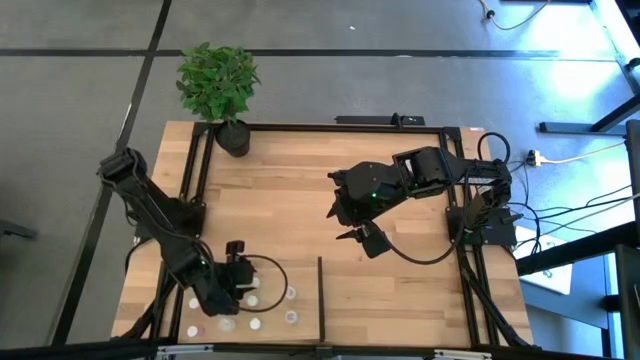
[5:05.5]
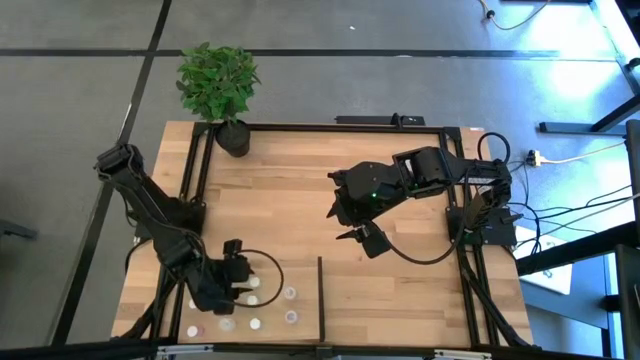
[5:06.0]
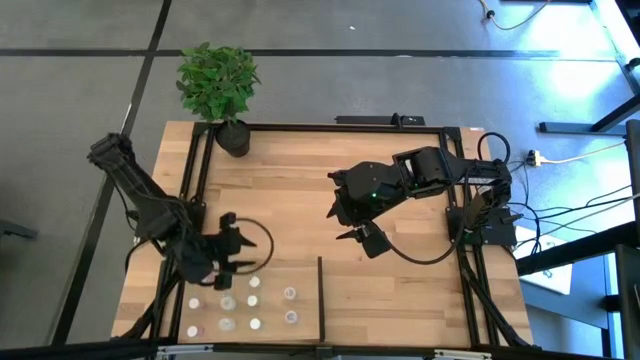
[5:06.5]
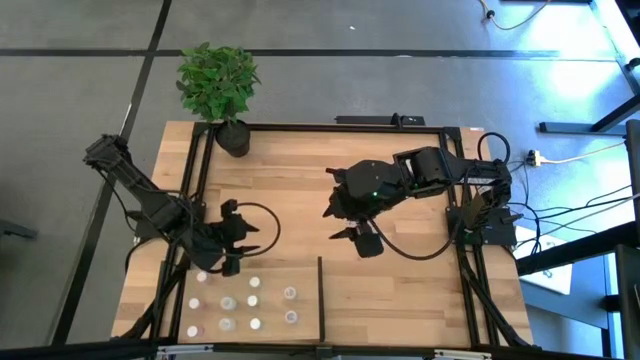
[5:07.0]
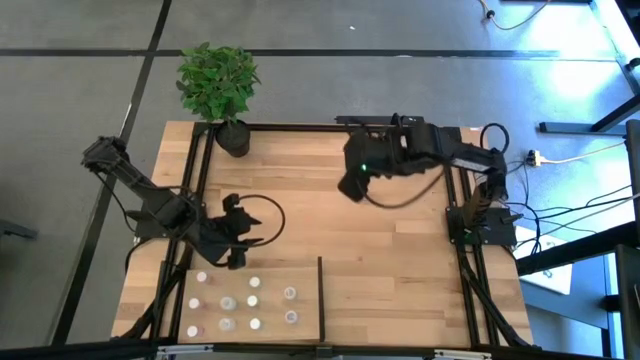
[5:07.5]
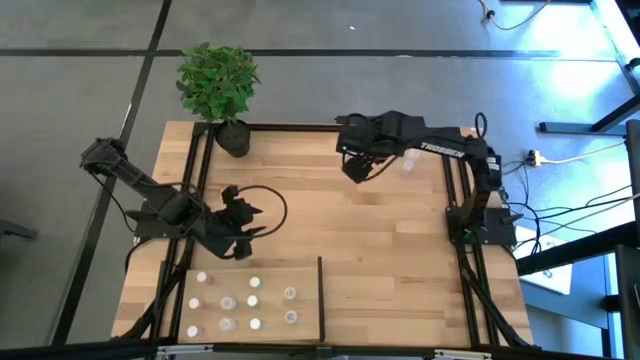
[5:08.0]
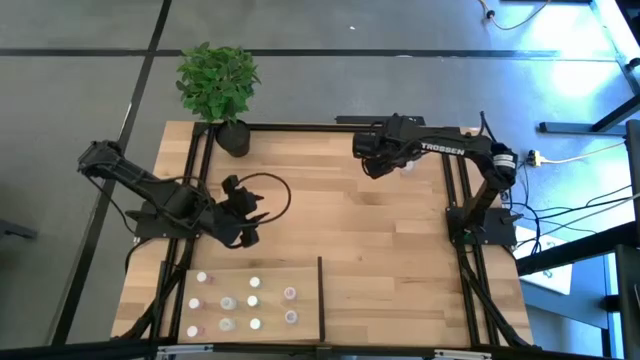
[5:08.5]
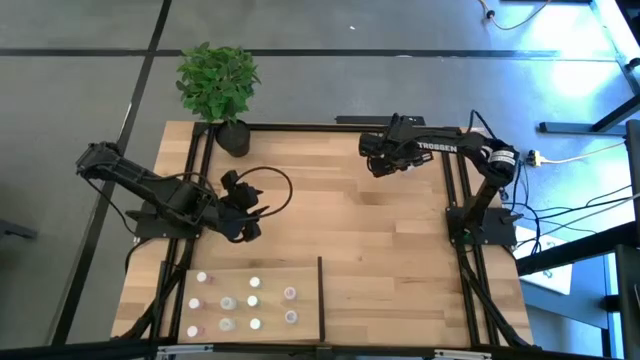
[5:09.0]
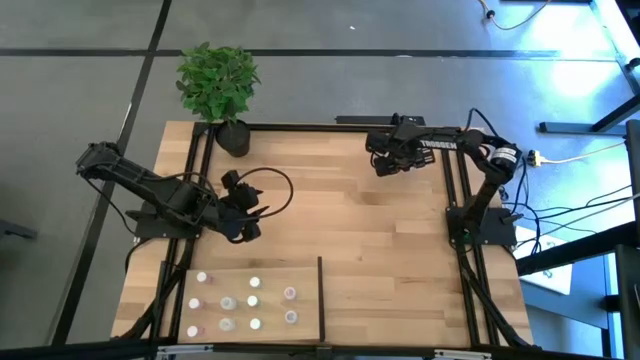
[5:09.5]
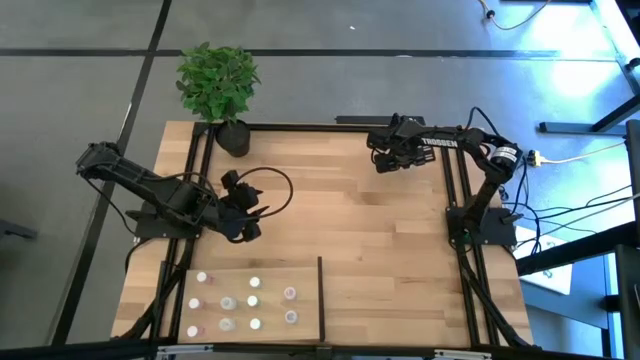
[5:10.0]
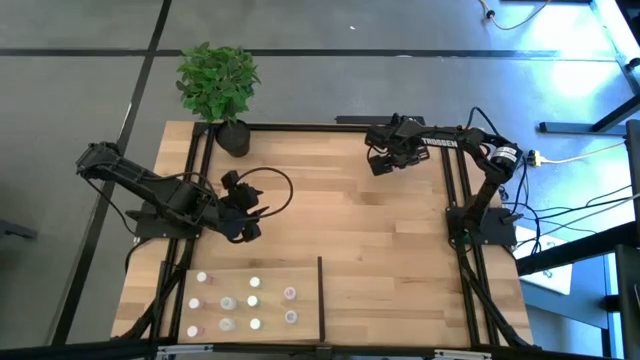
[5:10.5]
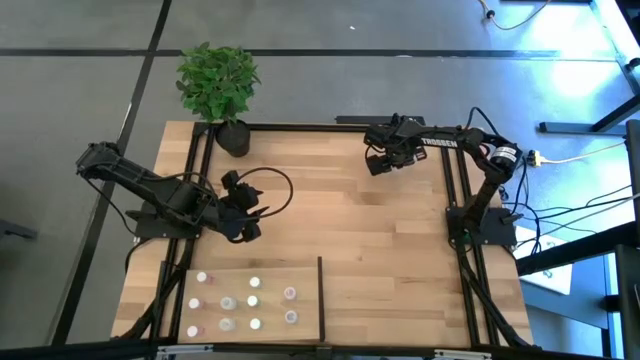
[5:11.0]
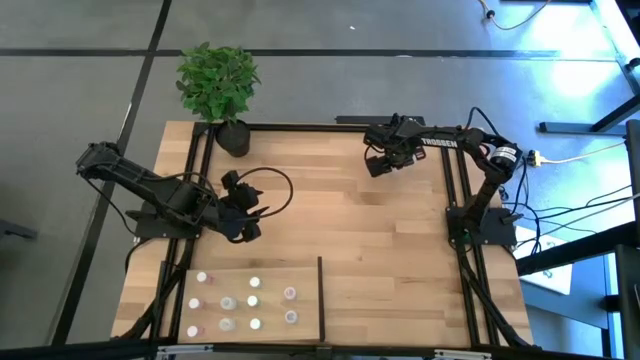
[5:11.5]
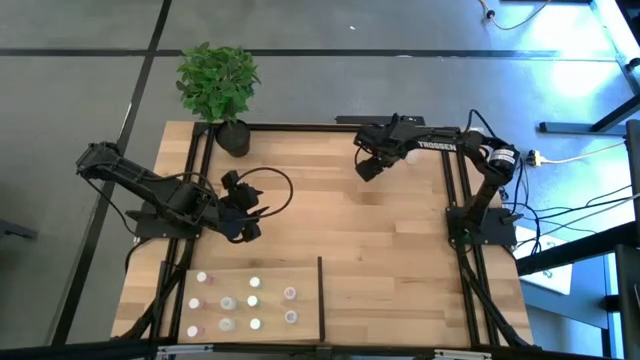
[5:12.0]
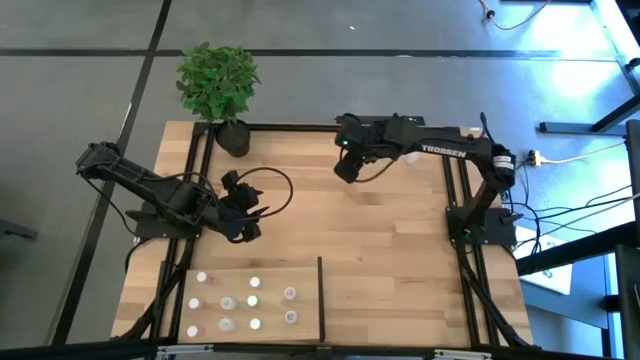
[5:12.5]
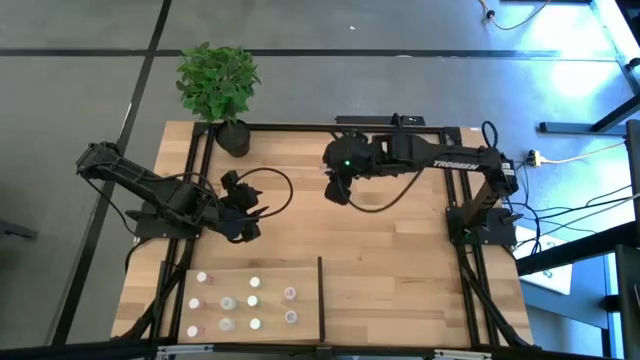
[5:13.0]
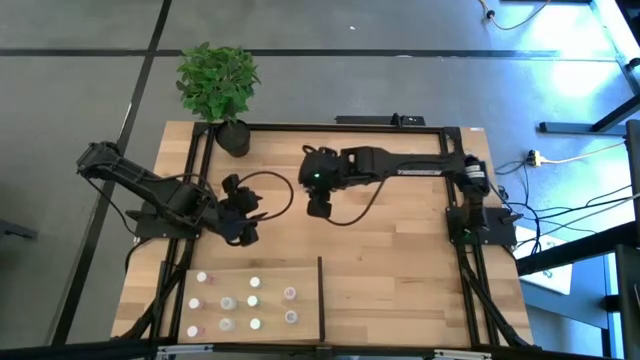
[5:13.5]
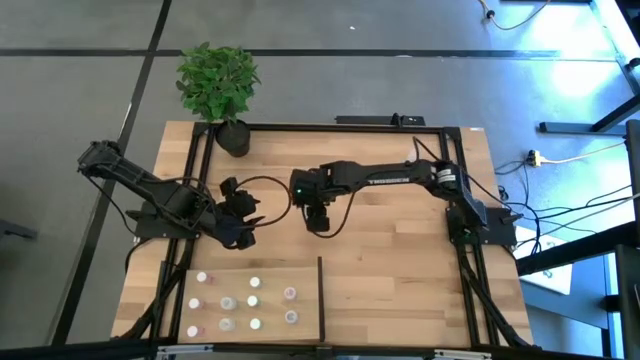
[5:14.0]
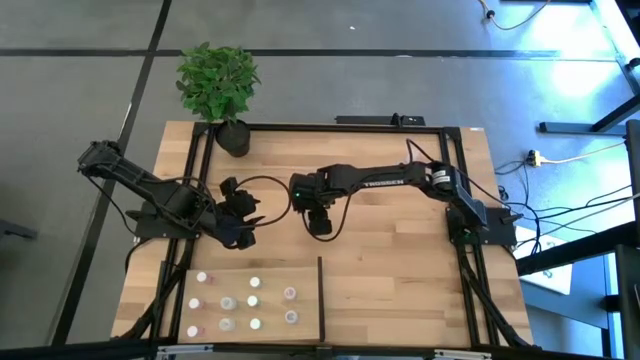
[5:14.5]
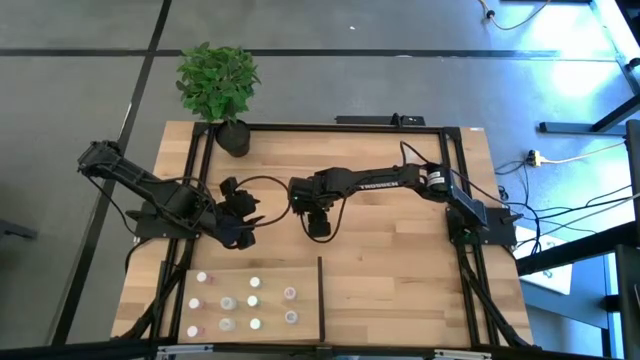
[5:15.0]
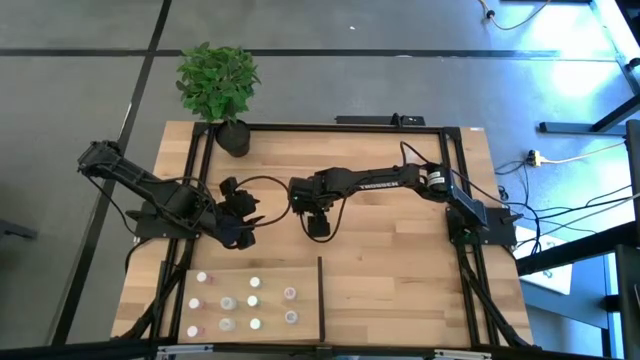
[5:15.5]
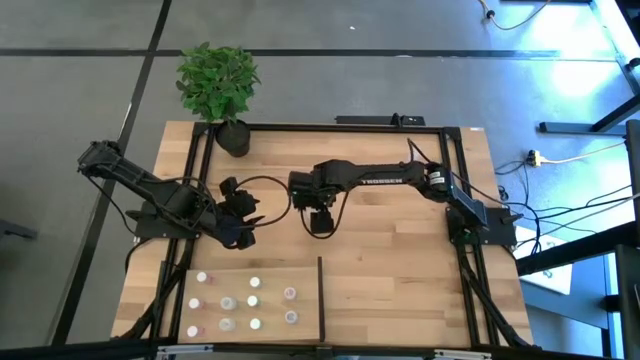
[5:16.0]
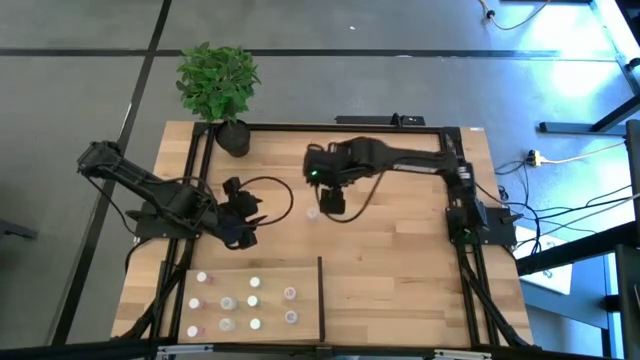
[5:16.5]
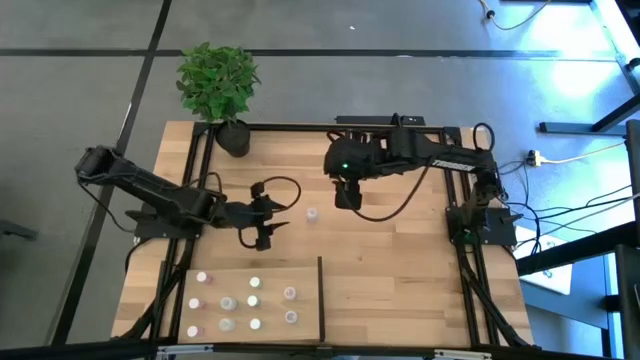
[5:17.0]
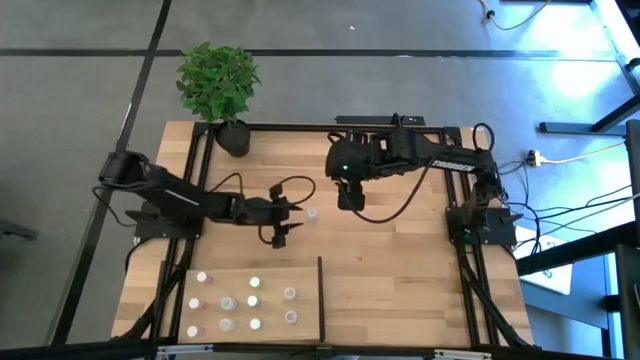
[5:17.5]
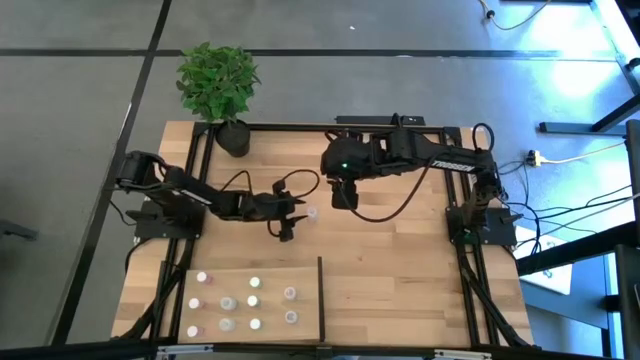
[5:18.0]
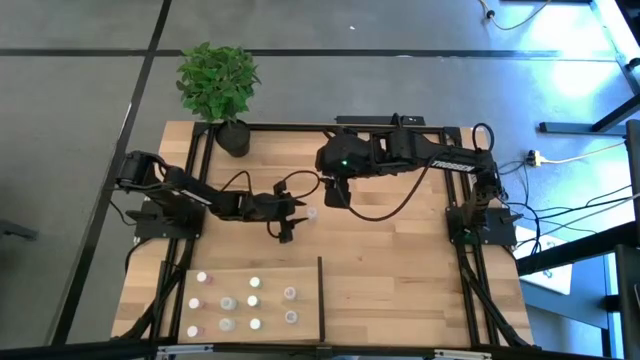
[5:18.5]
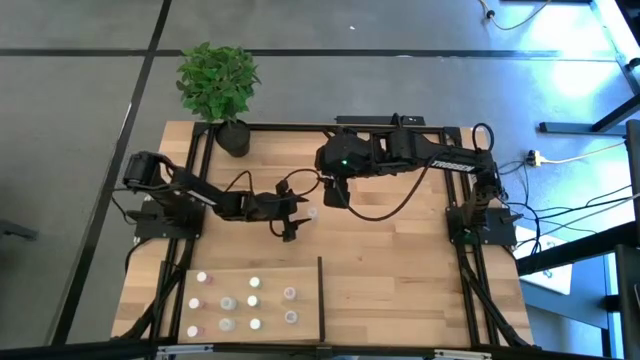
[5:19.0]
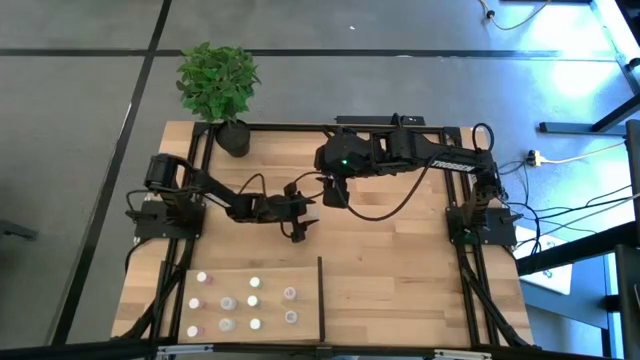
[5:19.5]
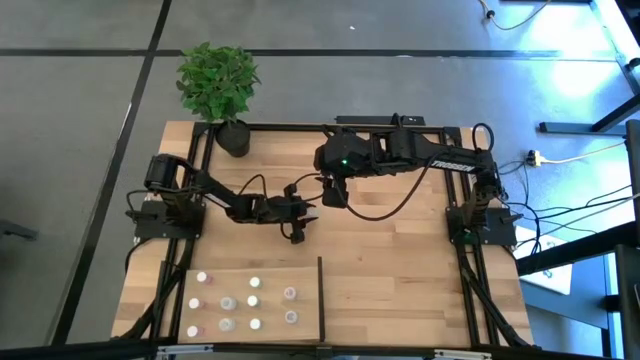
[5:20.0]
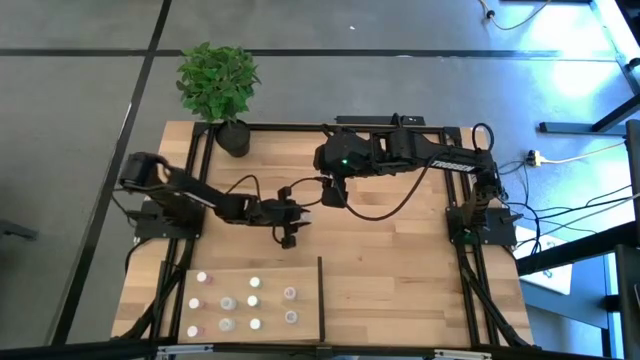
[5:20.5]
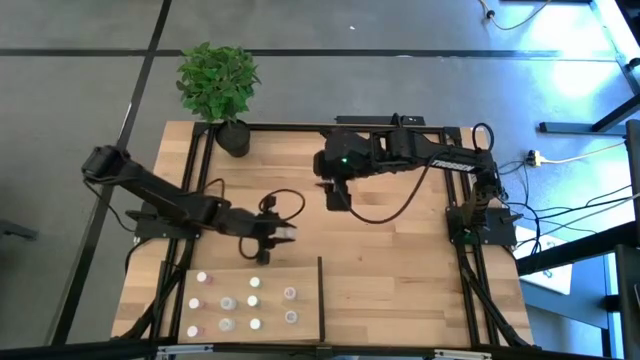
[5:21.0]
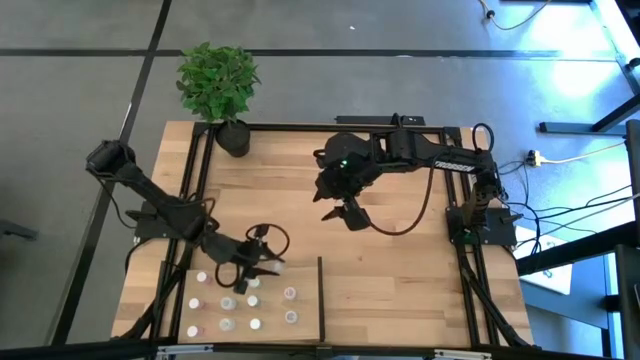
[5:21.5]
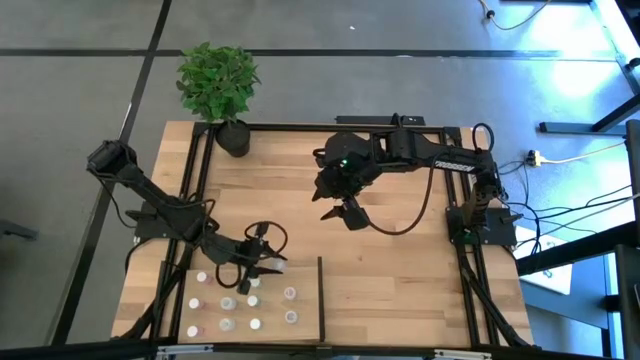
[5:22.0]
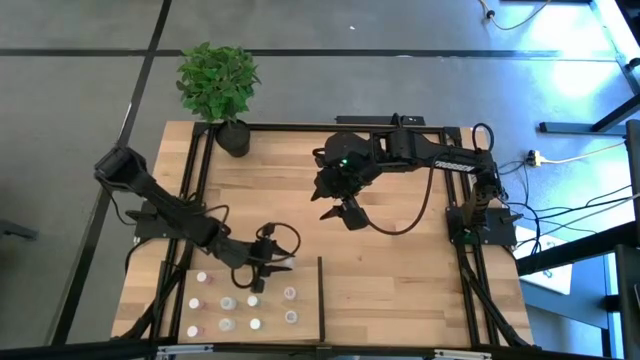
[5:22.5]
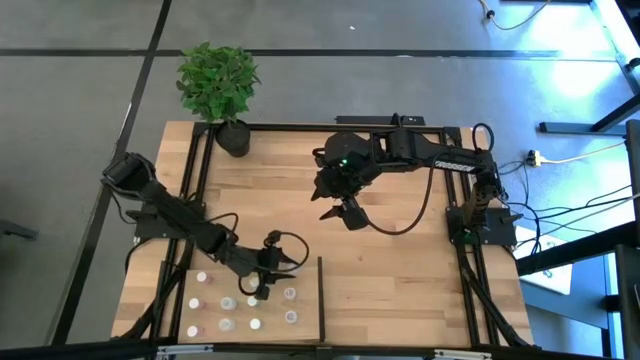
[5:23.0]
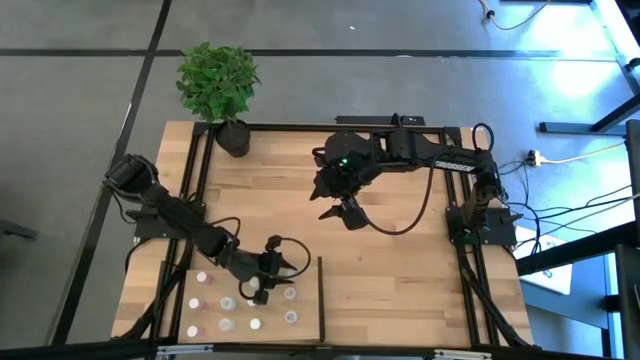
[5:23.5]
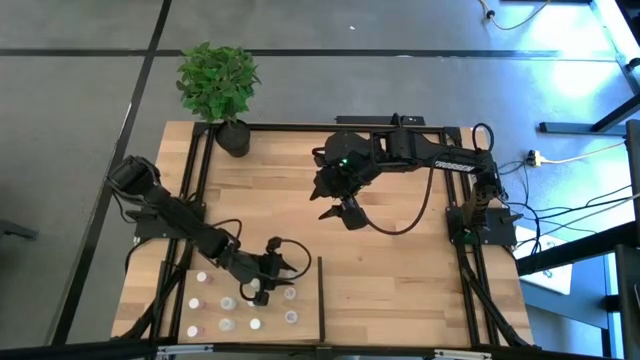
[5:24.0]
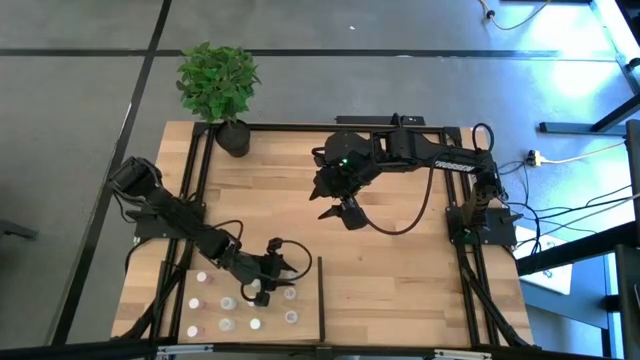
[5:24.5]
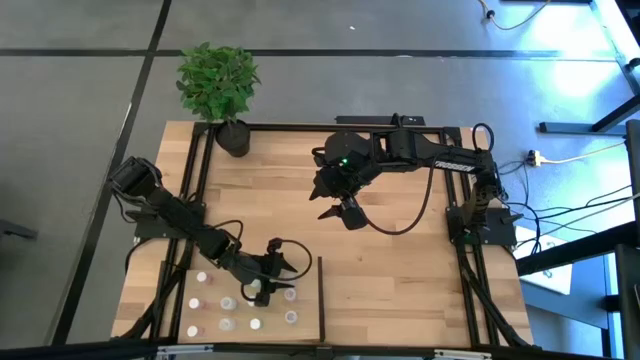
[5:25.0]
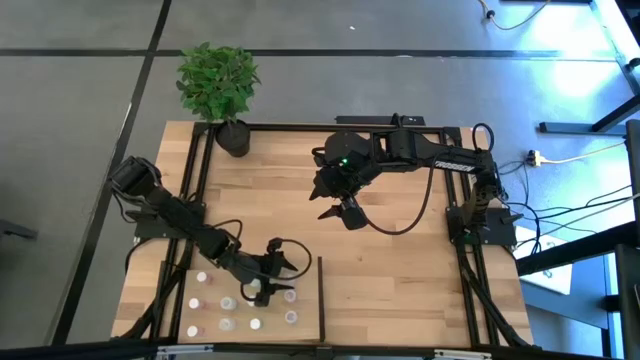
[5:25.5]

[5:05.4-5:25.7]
Task: Pick and place medicine bottles onto shelf by color
Put the transparent pill bottle on the shelf aligned with the other transparent pill bottles
